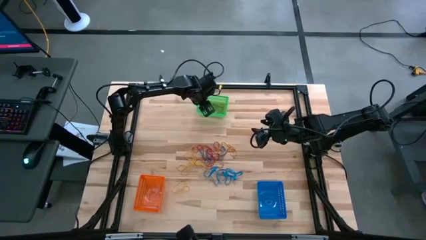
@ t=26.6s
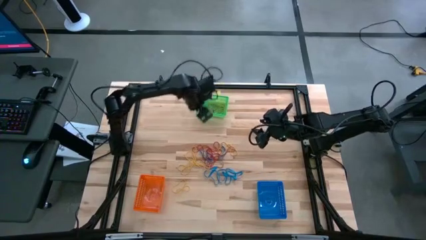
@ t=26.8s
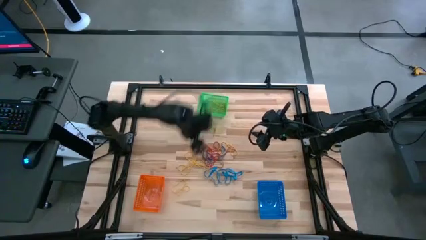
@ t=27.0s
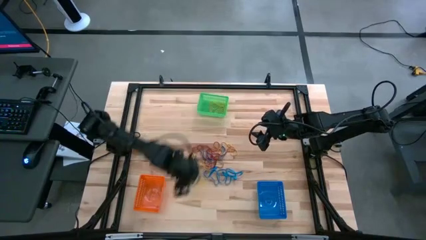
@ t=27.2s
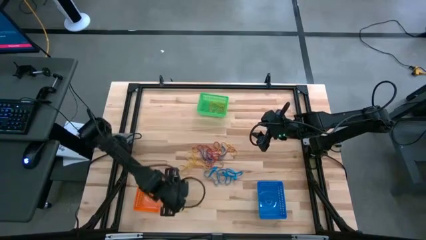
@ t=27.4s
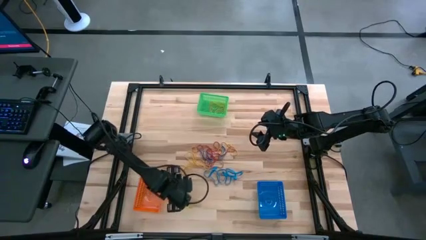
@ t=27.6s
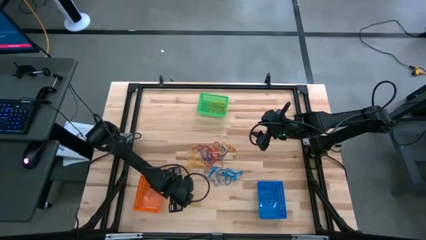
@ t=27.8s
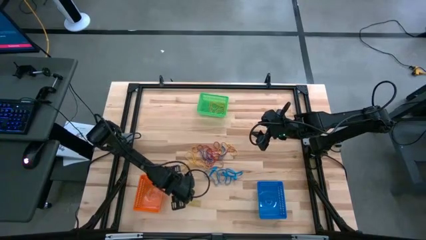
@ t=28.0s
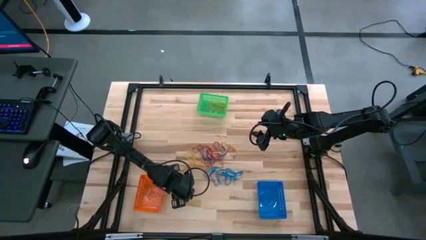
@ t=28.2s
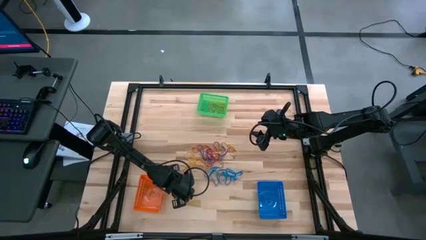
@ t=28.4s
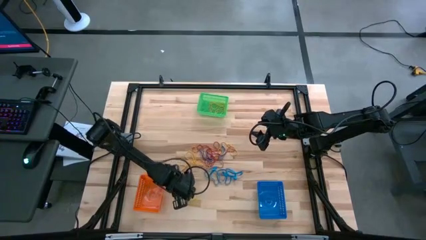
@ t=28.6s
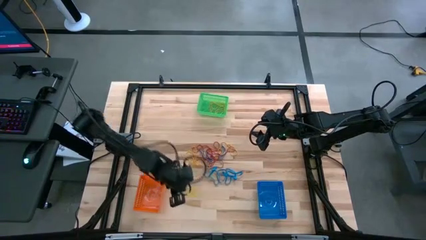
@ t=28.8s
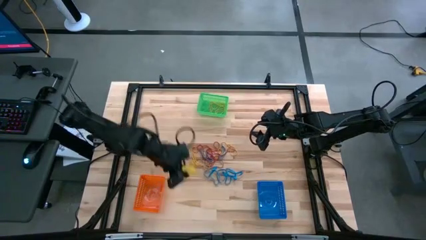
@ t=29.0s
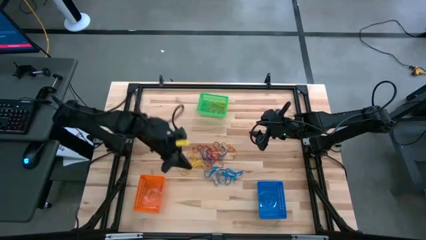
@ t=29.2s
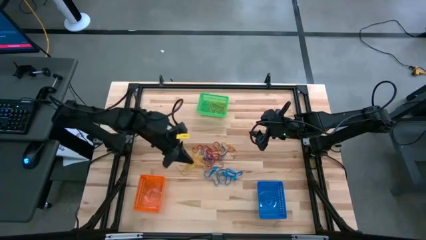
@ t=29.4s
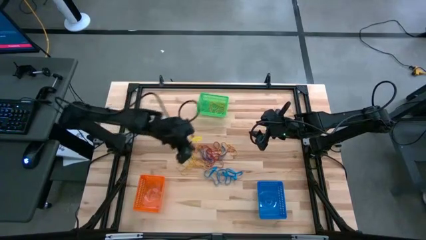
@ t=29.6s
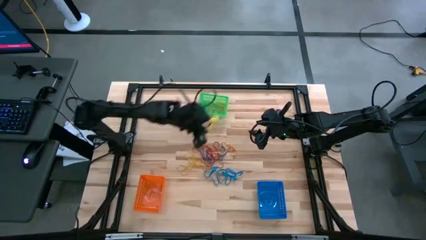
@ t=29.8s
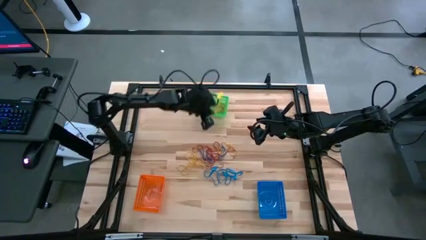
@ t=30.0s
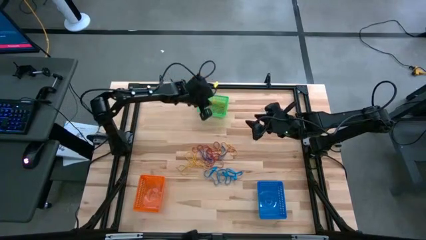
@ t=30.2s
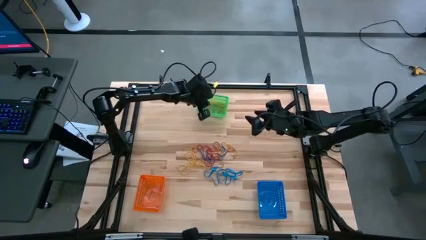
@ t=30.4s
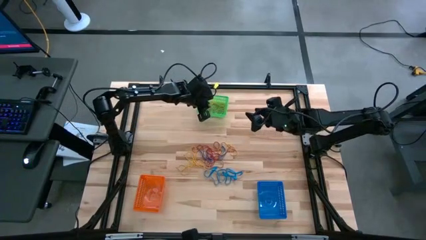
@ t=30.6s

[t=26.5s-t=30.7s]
Task: Sort rubber bands into baskets
Put the yellow rubber band into the green bin

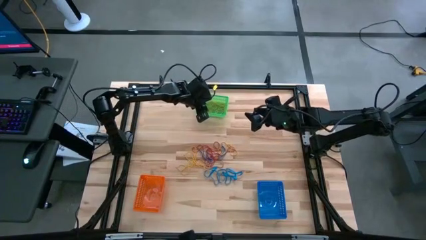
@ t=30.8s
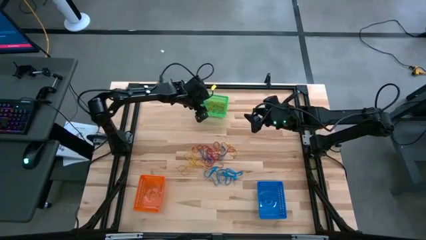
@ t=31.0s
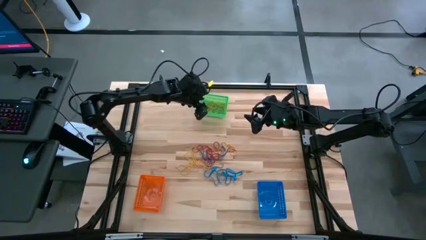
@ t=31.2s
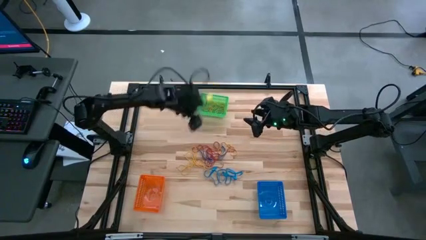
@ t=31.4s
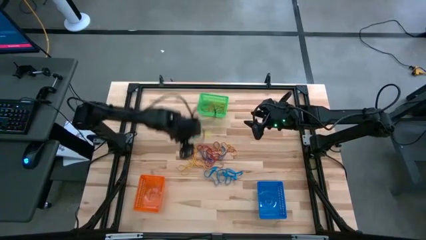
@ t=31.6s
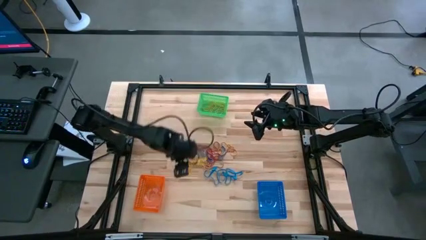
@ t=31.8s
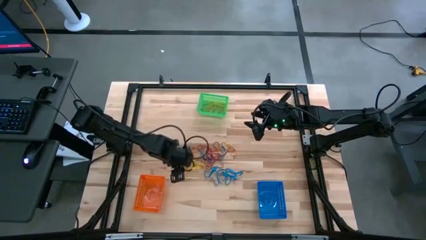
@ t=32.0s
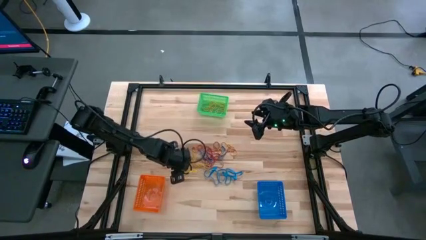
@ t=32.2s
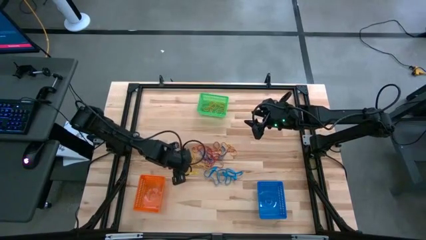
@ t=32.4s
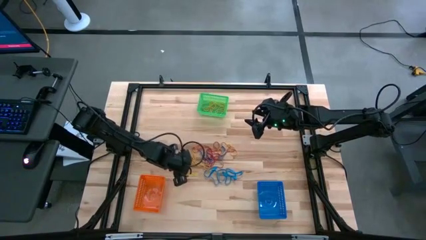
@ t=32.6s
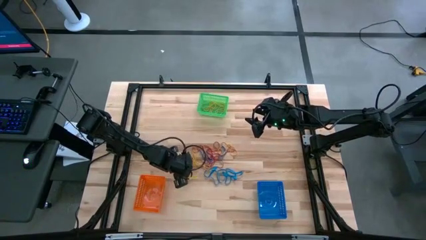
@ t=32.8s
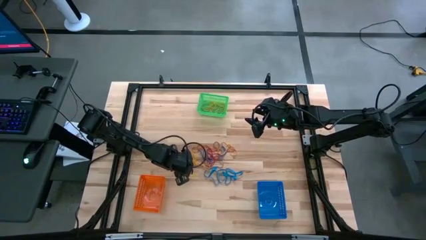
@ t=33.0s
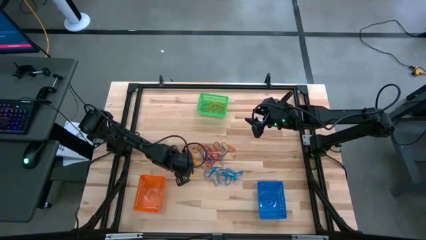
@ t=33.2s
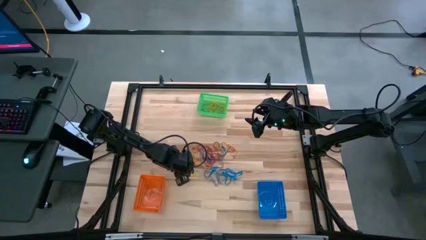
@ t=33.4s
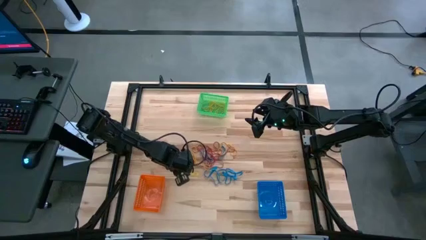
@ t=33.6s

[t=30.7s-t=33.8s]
Put the yellow rubber band into the green bin

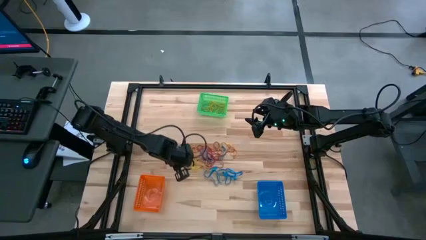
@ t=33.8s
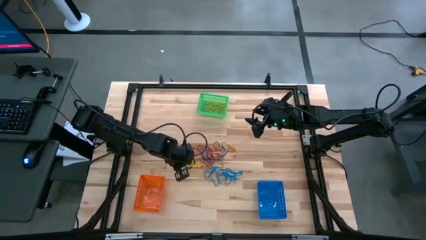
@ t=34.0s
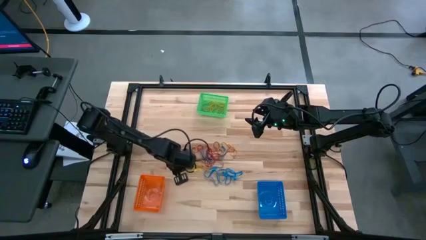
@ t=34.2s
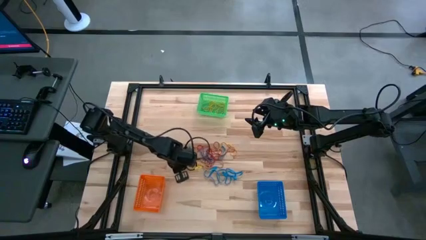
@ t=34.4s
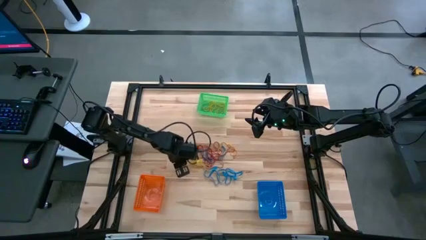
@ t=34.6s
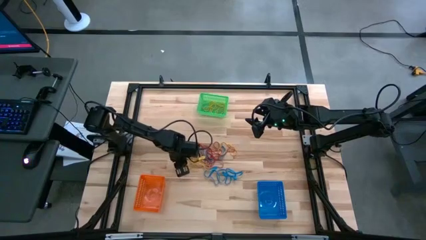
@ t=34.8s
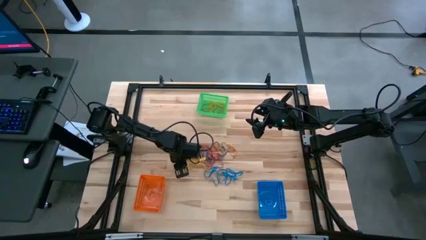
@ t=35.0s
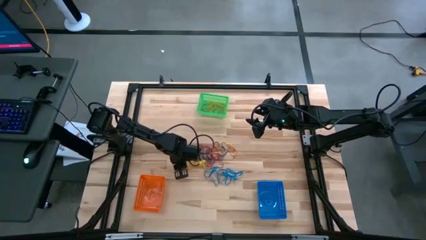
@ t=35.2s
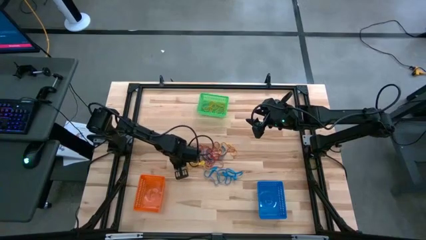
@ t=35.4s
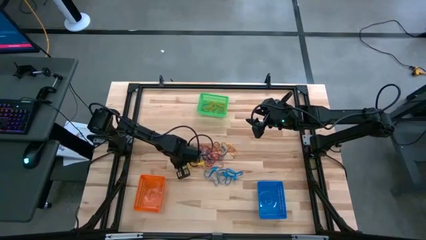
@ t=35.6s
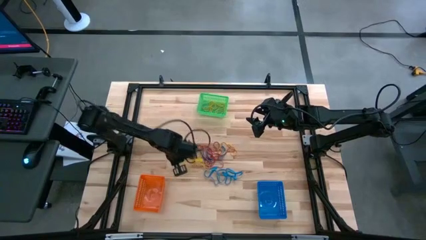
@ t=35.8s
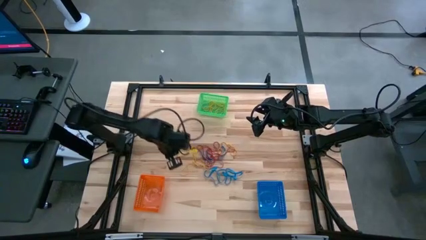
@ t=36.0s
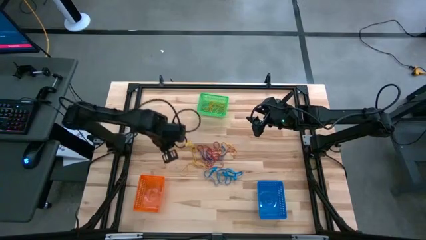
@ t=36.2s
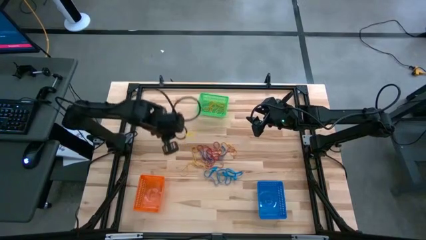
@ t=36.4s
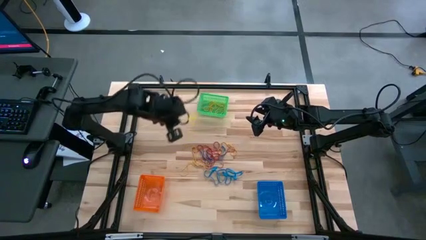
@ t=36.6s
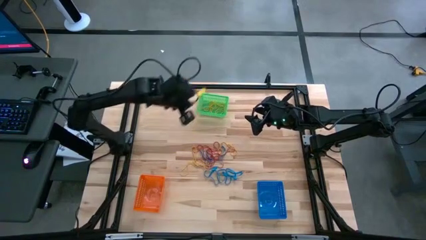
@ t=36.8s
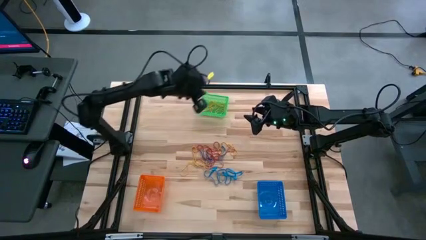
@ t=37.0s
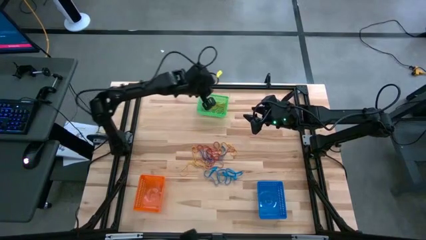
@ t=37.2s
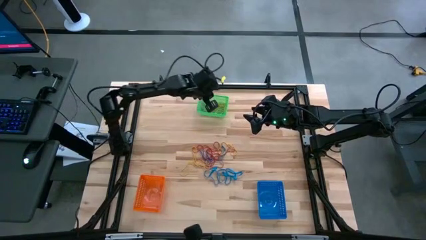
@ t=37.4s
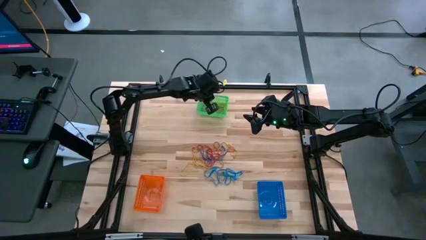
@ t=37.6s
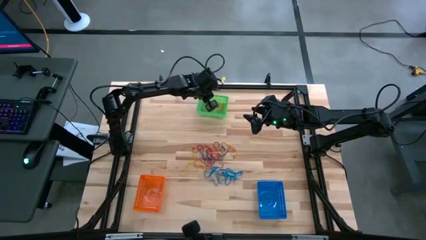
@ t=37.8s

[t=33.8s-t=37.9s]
Put the yellow rubber band into the green bin

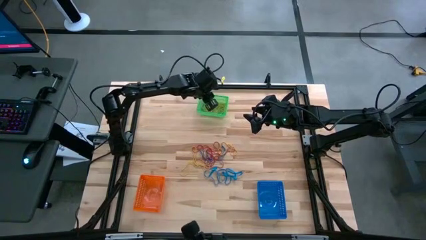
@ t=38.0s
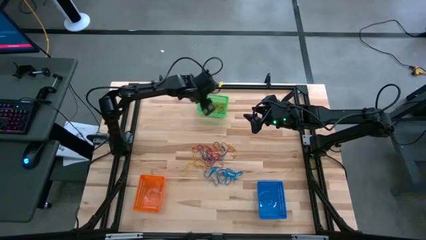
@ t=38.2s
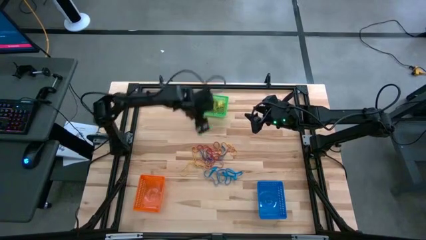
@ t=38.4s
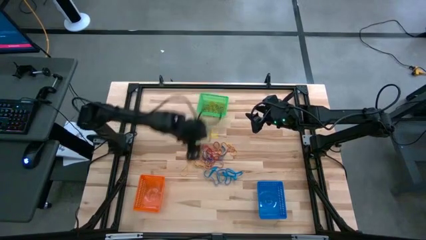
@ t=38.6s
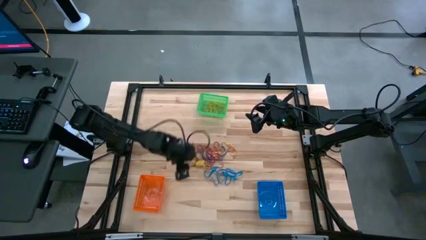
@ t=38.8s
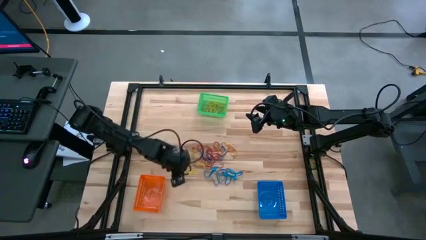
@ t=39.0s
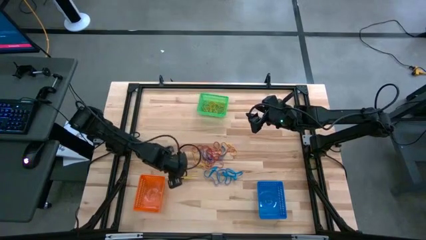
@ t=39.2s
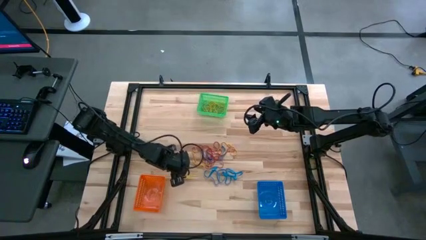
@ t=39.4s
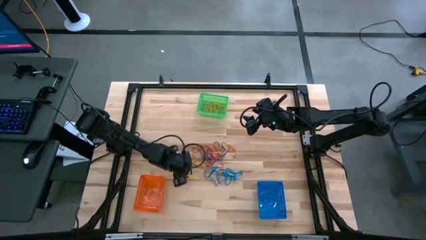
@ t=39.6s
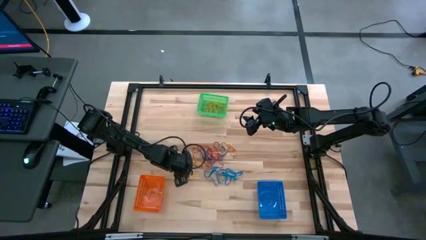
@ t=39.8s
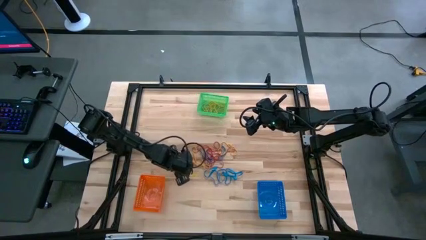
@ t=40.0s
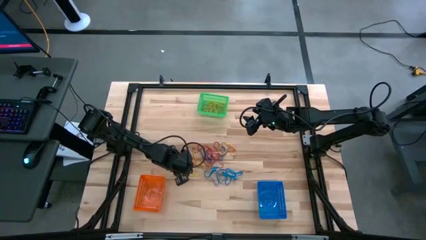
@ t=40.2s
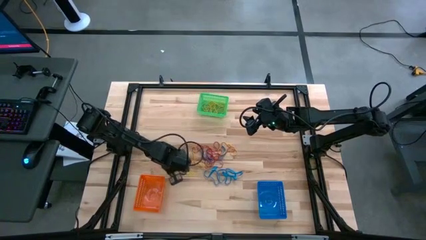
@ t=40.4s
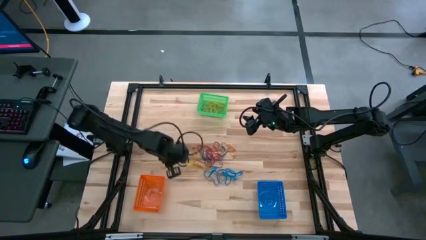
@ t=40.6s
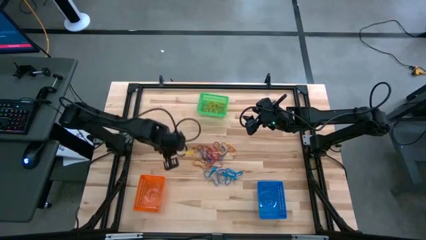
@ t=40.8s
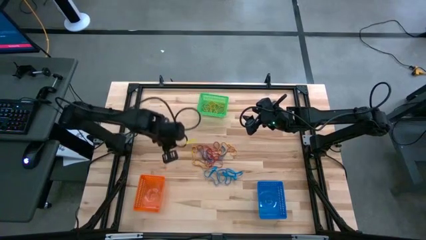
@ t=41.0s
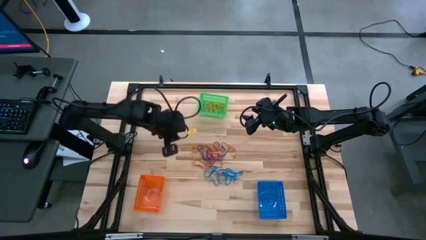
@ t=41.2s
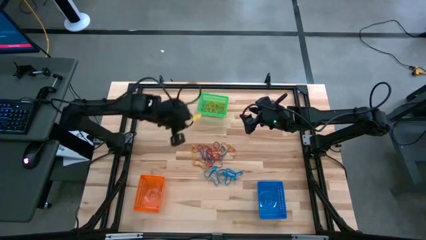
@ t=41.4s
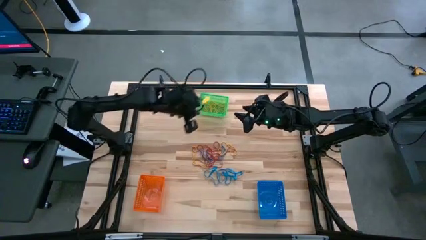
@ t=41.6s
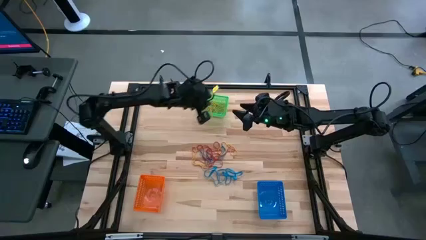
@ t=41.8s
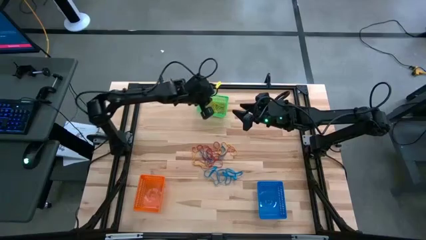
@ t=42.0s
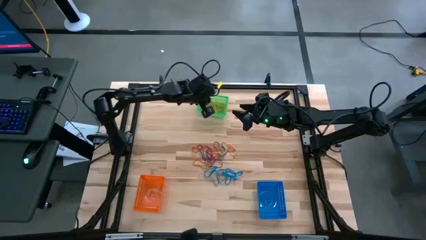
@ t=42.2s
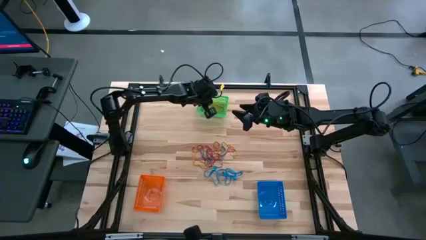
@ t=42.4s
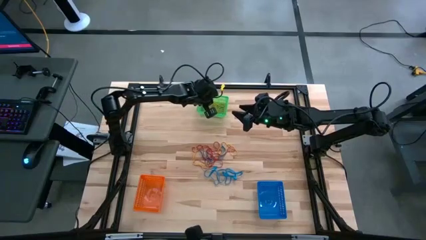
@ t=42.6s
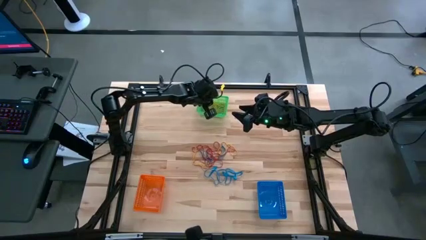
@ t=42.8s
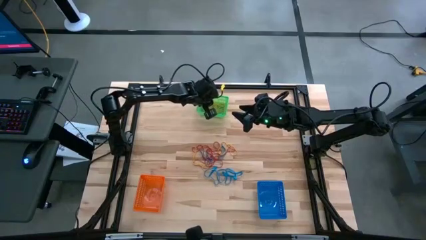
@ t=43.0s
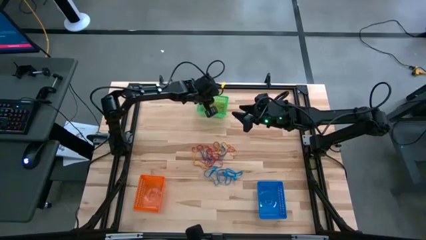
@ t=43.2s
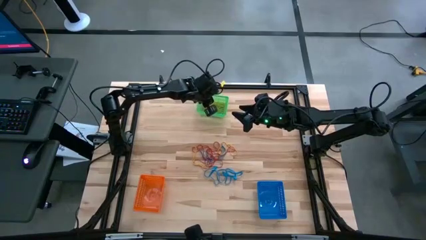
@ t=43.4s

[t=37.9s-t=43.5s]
Put the yellow rubber band into the green bin
